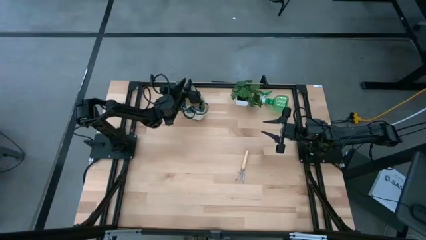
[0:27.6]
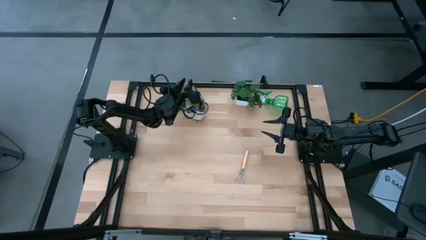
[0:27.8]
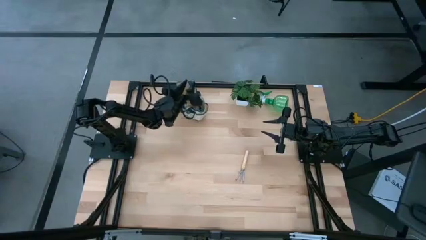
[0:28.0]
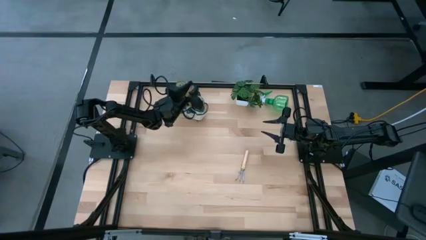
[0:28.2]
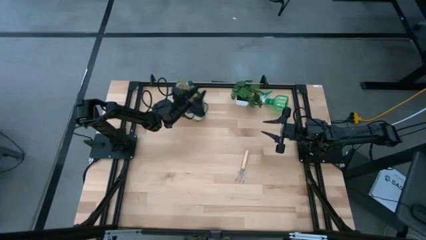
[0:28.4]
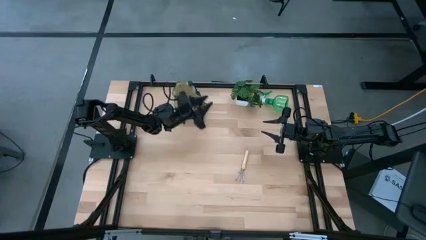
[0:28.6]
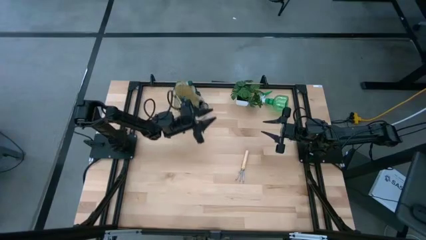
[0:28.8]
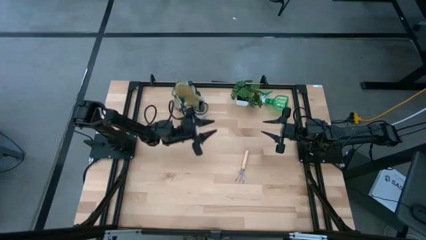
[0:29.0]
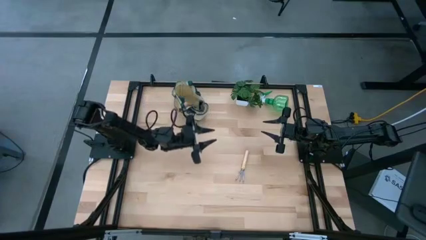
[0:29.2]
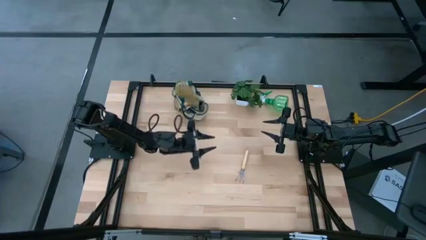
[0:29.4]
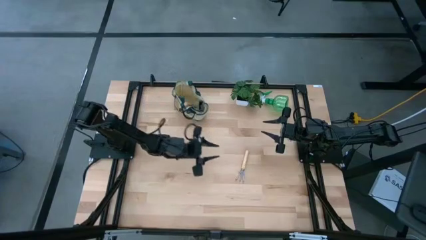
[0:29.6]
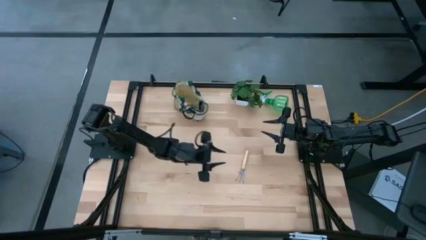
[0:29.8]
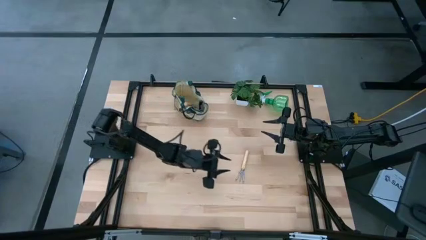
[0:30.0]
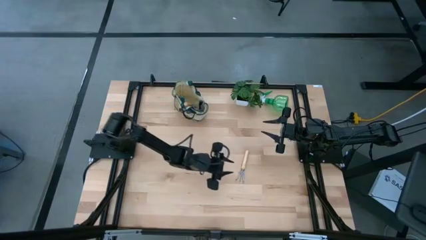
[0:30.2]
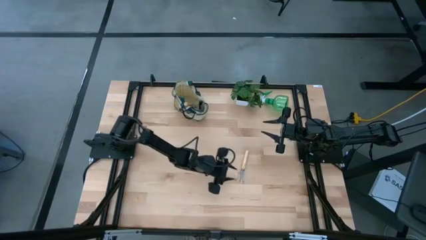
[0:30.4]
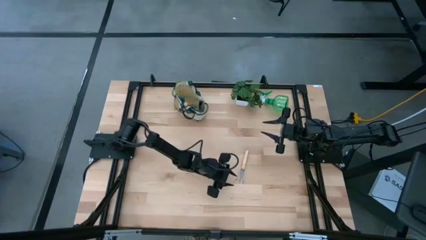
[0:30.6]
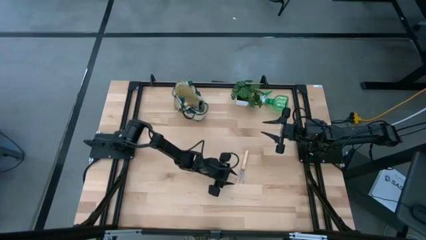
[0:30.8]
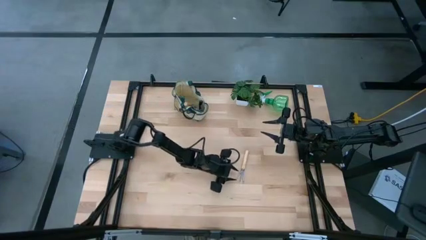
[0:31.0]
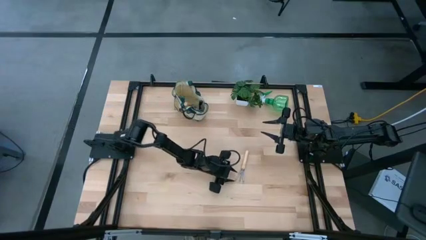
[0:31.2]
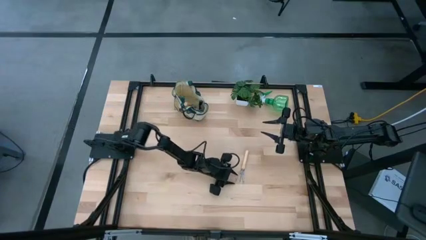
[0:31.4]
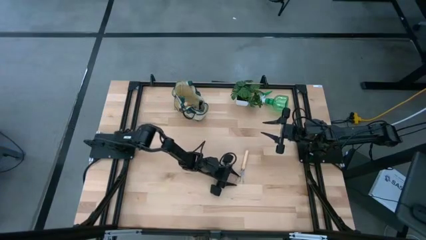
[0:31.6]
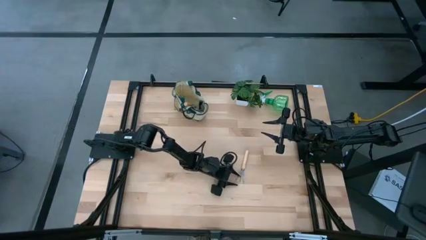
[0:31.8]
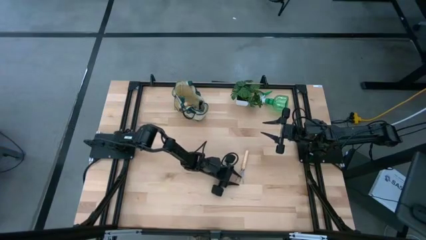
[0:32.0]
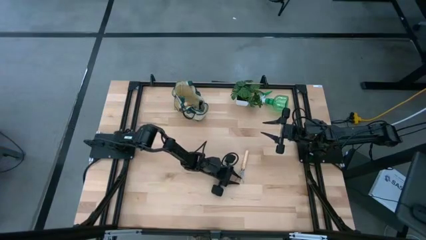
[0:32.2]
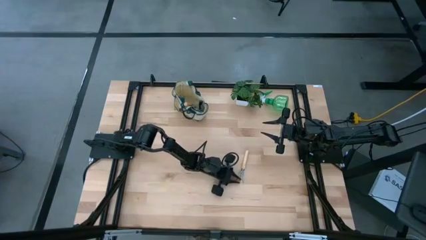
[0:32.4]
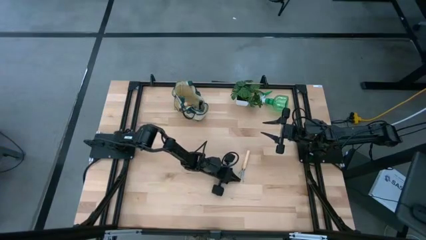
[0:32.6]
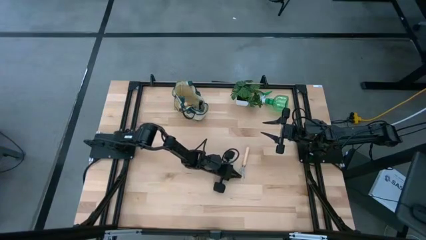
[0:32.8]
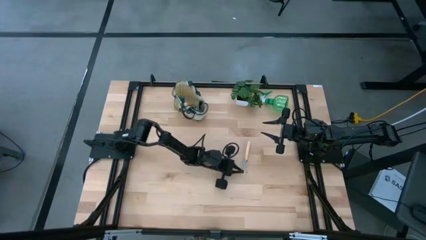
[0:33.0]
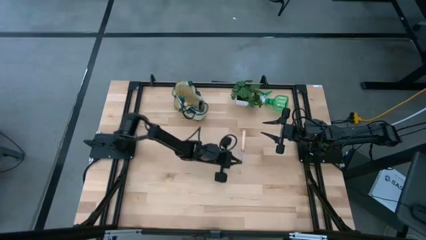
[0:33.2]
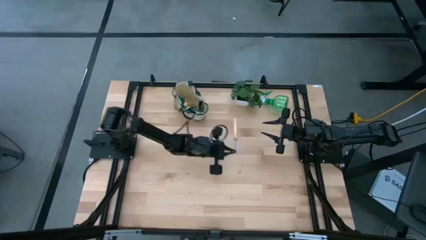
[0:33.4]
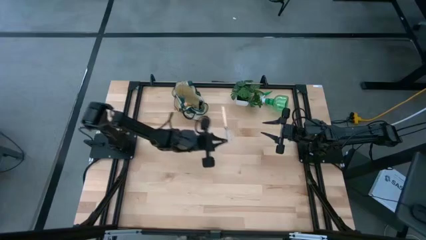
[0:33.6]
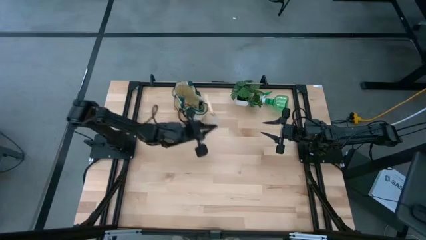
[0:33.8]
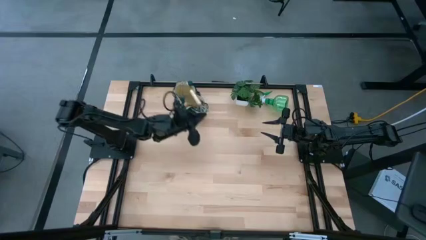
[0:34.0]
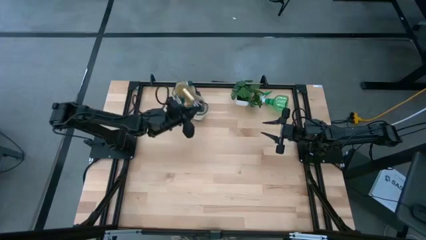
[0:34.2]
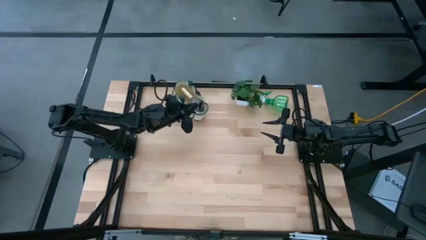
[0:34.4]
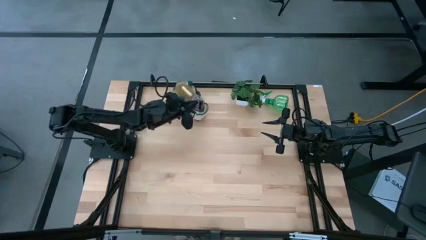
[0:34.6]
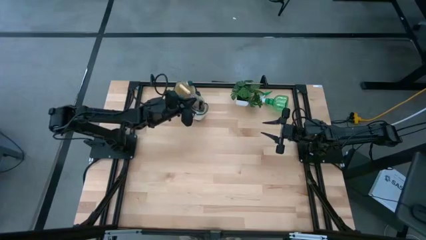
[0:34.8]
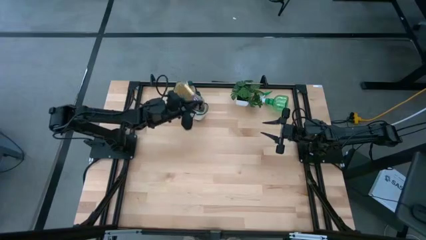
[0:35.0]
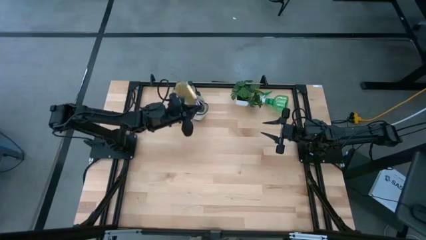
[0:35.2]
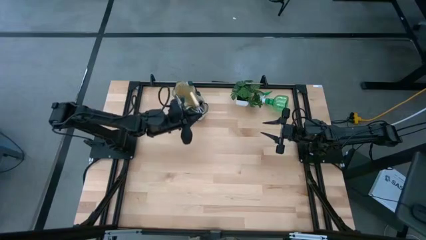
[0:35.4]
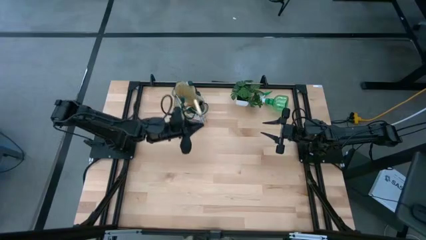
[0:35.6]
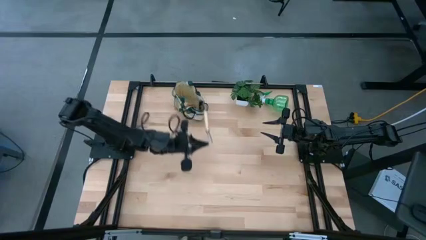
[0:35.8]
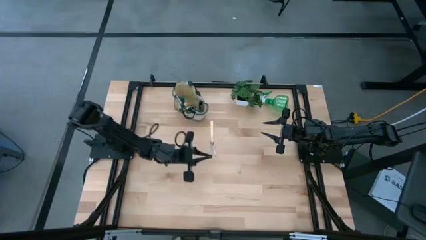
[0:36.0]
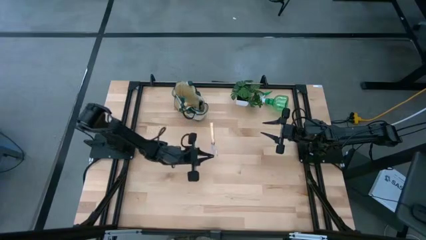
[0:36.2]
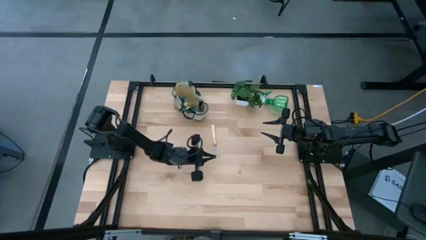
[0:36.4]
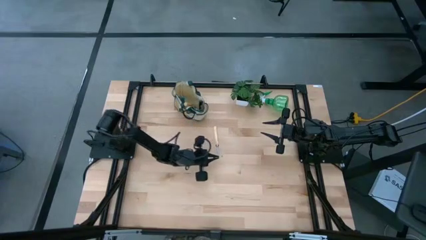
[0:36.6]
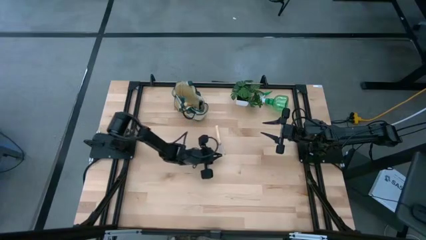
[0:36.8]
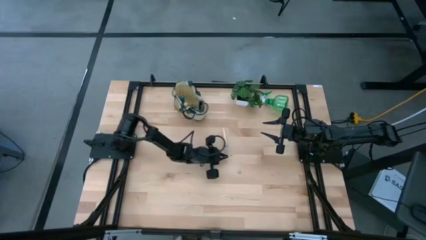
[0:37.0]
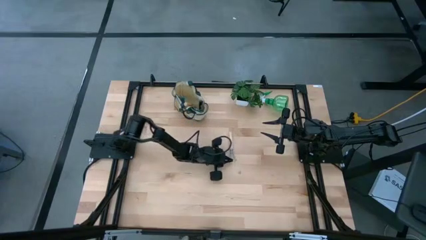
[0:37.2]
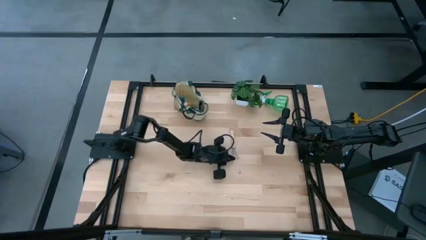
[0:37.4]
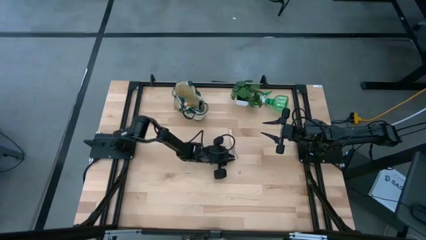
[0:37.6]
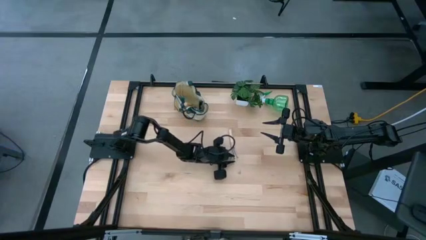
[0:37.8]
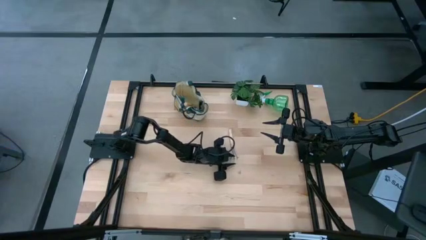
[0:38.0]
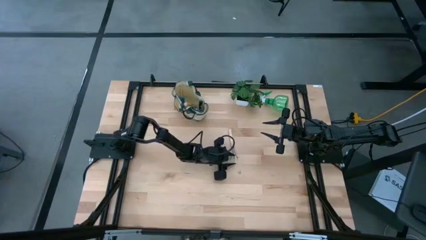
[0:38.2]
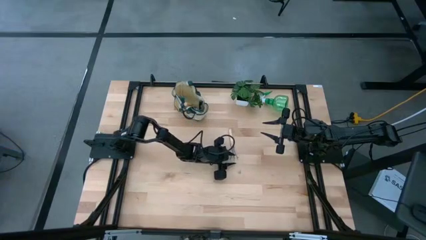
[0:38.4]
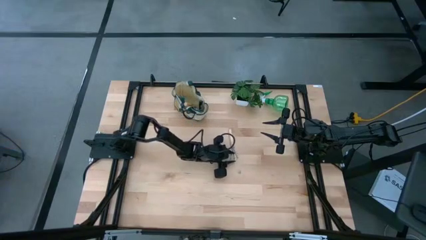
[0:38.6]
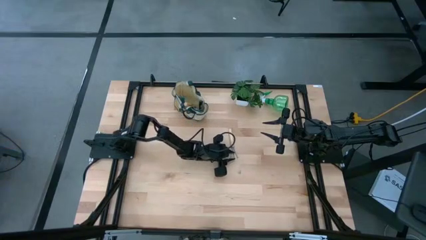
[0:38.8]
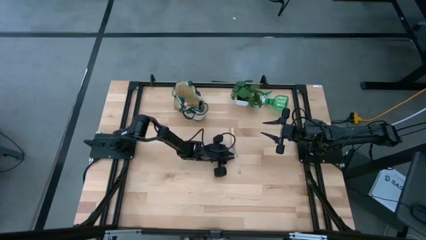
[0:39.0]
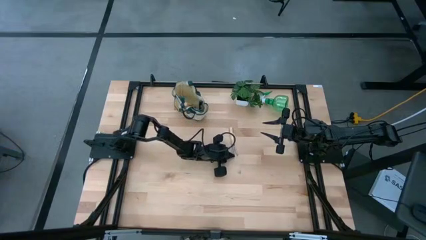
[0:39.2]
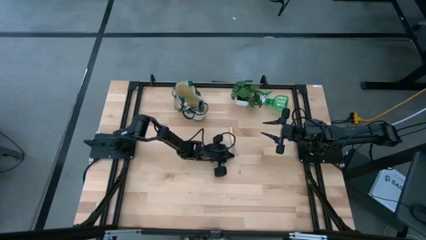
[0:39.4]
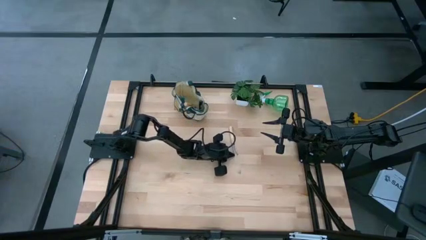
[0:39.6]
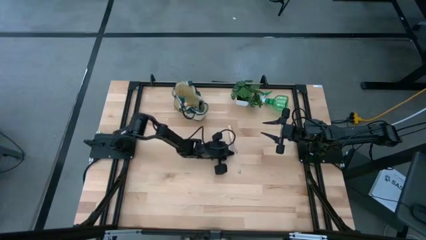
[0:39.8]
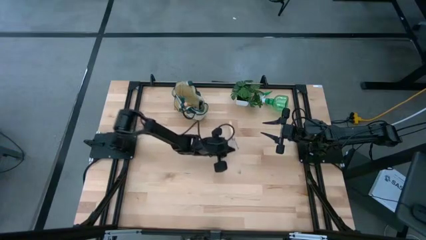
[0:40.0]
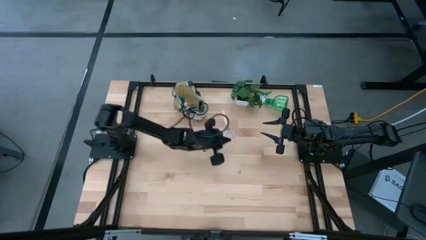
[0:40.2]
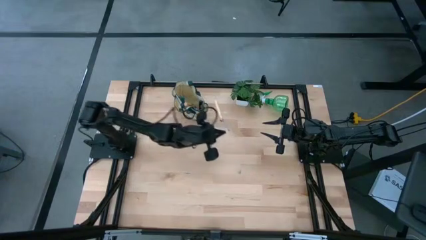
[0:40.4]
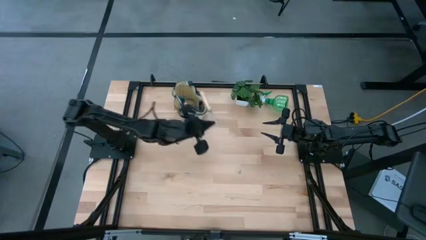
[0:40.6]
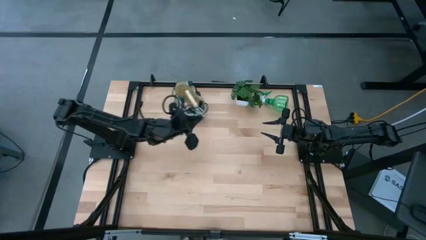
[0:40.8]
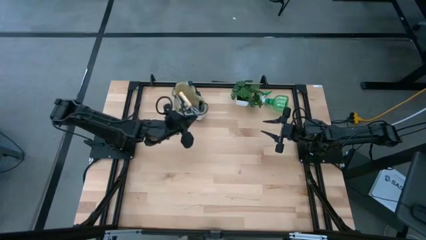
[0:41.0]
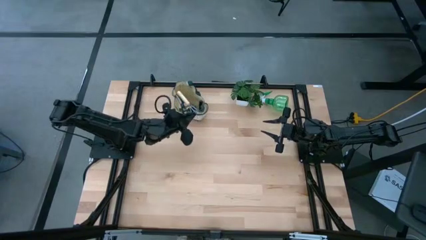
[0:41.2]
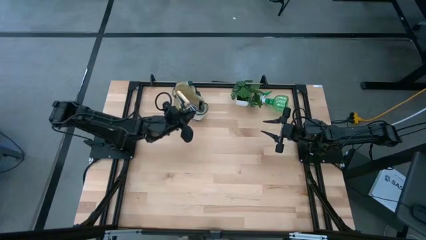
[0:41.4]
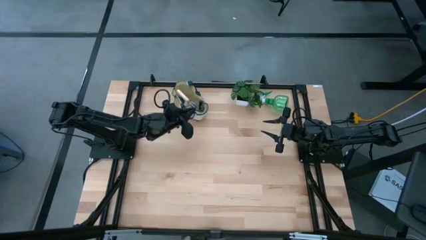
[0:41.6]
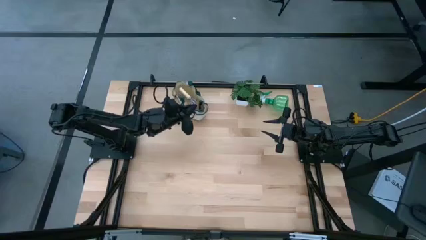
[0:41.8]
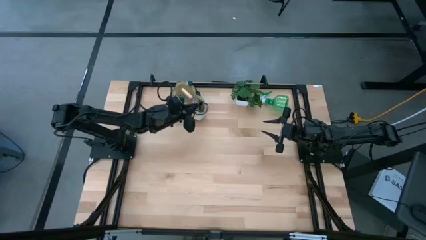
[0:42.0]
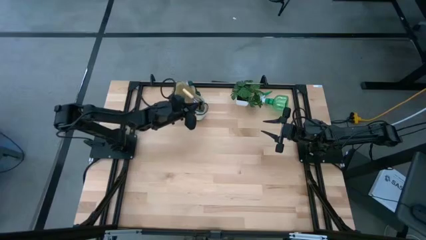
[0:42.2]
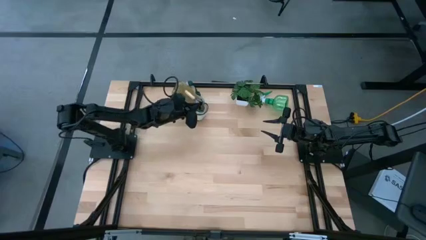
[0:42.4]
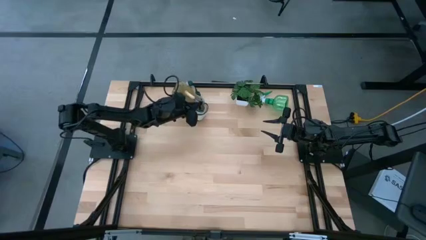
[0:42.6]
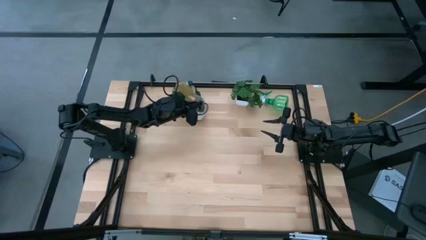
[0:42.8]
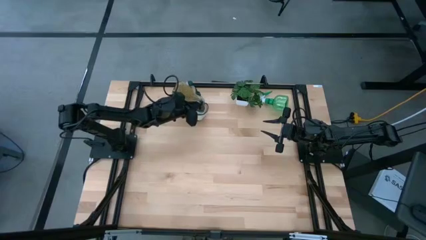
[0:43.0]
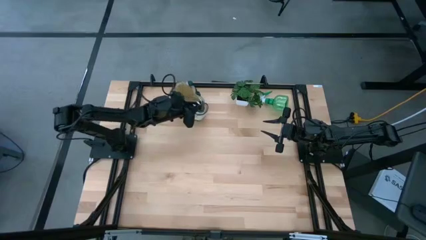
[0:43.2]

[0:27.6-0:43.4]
Task: Pick & Place Garden tools in Gardening bag
Put the brown hand rake into the gardening bag
